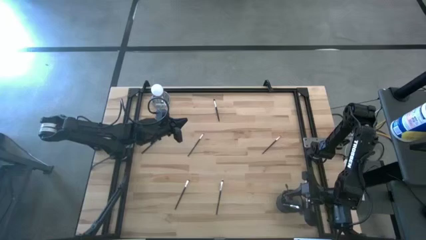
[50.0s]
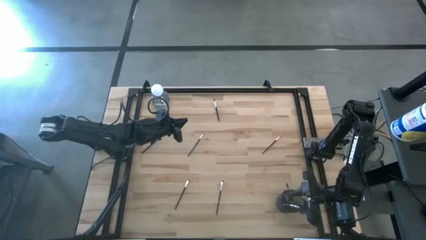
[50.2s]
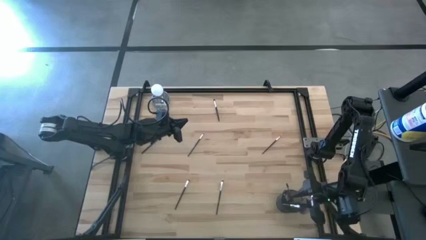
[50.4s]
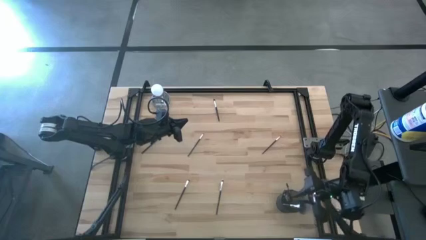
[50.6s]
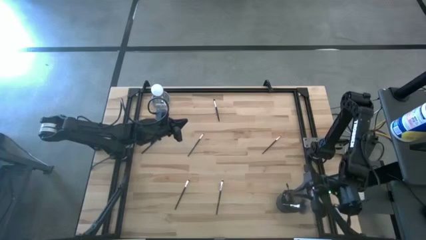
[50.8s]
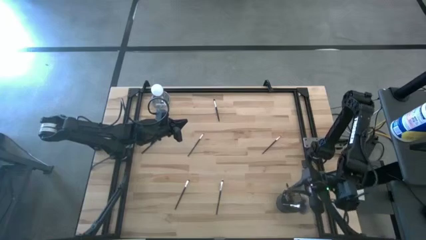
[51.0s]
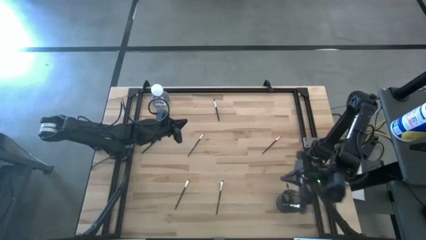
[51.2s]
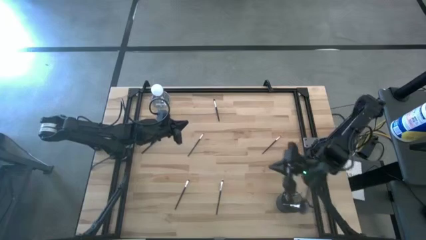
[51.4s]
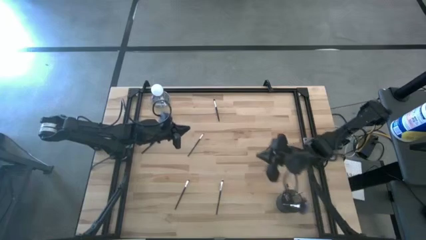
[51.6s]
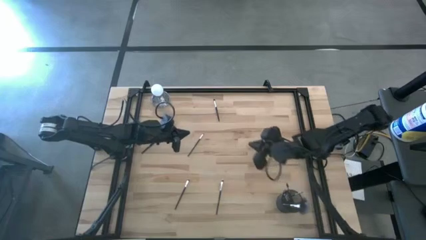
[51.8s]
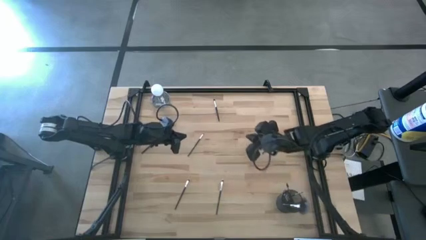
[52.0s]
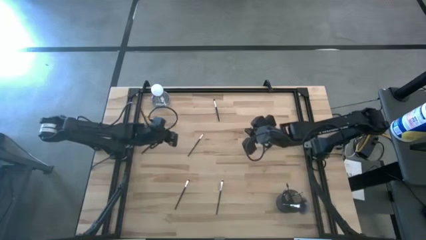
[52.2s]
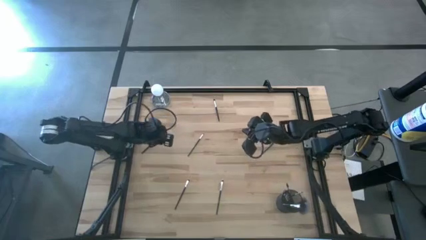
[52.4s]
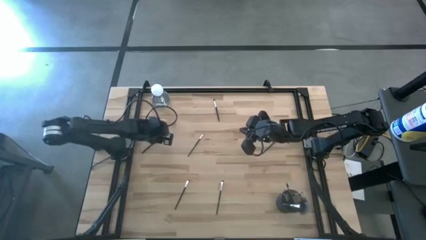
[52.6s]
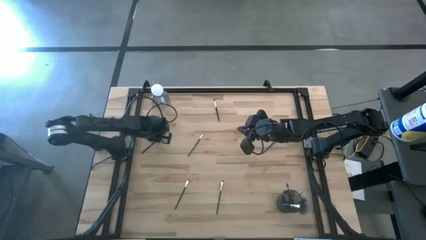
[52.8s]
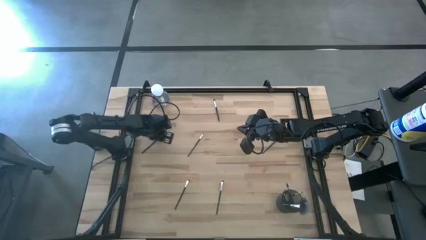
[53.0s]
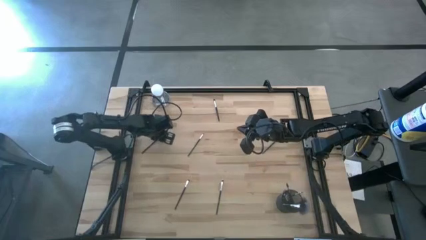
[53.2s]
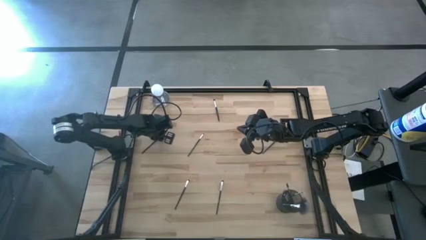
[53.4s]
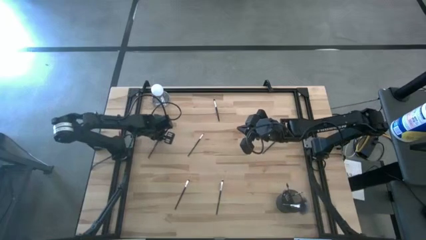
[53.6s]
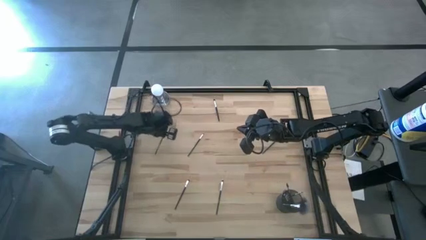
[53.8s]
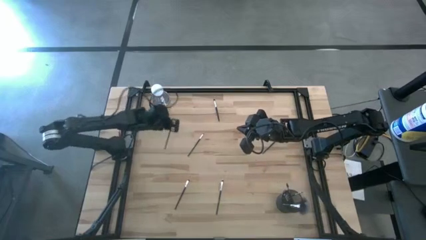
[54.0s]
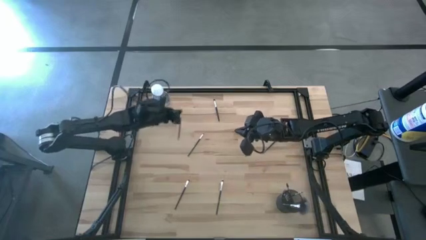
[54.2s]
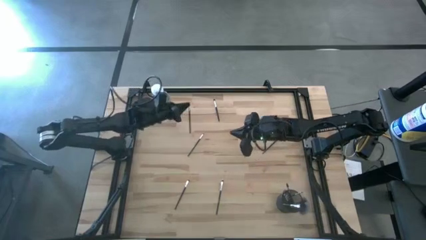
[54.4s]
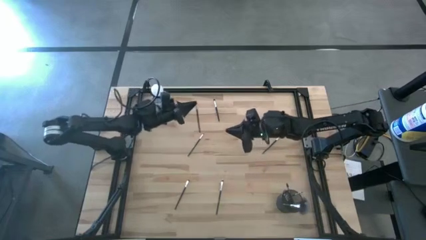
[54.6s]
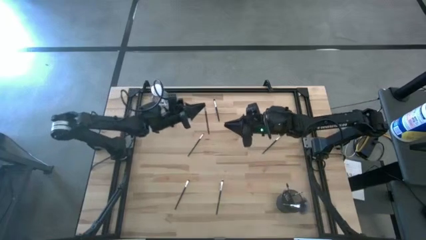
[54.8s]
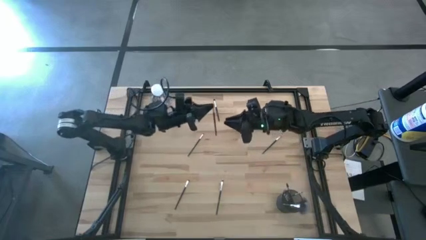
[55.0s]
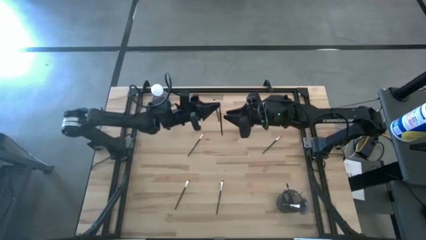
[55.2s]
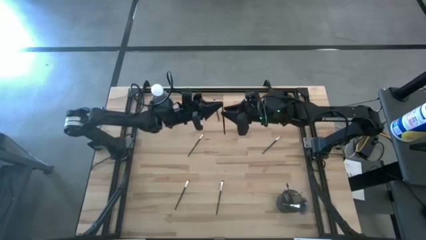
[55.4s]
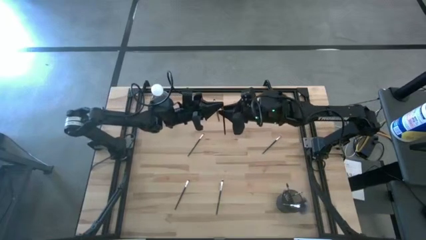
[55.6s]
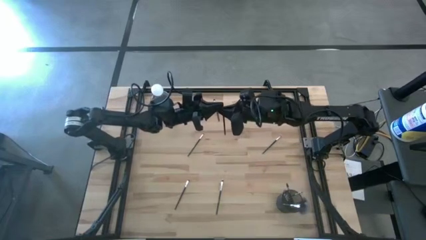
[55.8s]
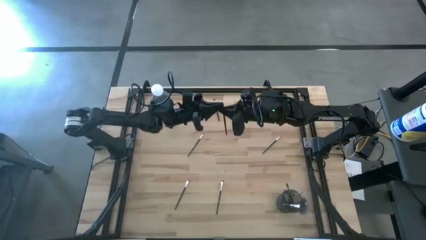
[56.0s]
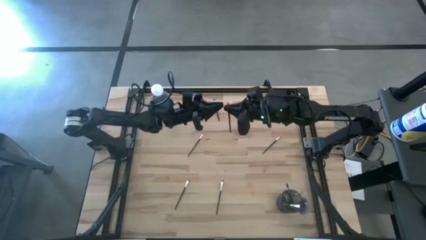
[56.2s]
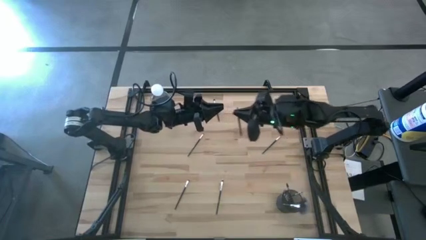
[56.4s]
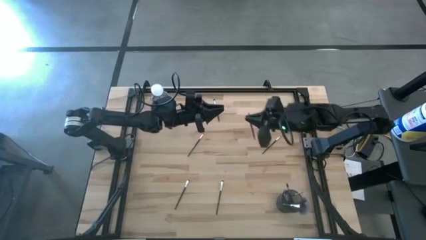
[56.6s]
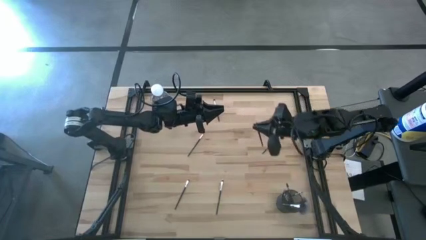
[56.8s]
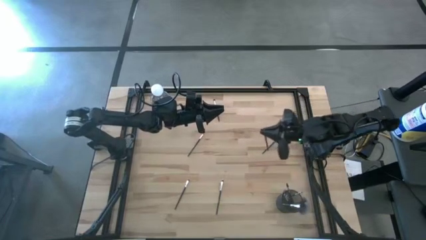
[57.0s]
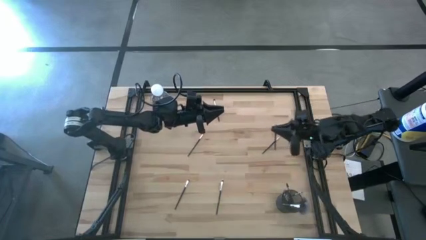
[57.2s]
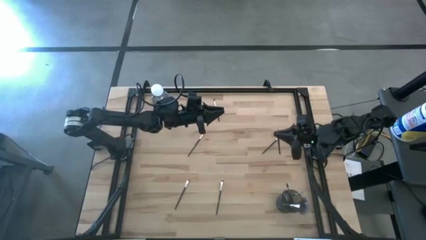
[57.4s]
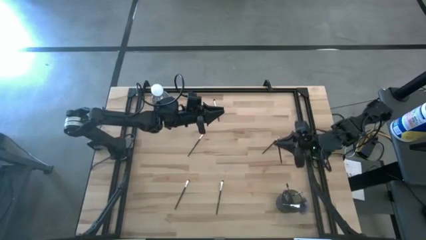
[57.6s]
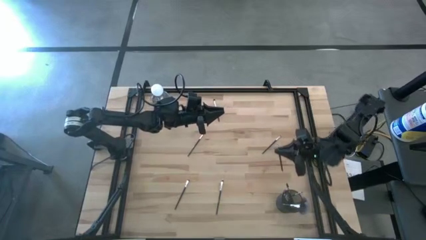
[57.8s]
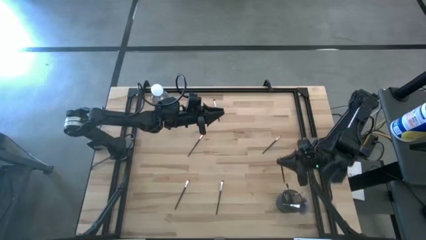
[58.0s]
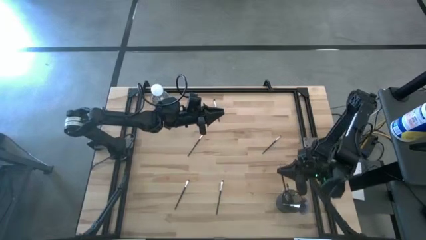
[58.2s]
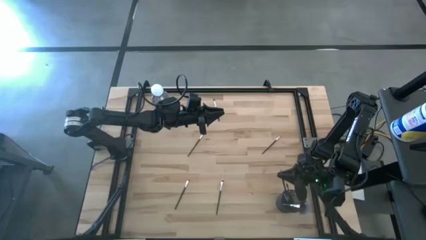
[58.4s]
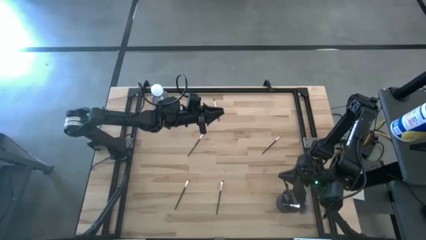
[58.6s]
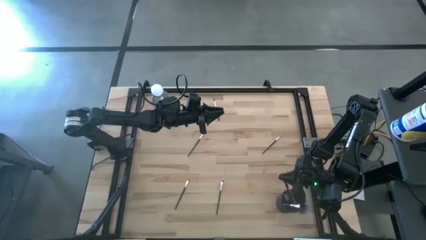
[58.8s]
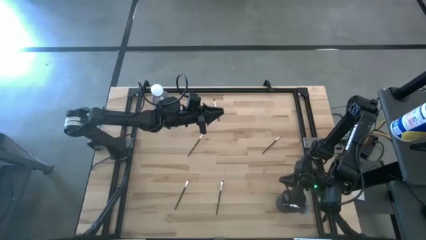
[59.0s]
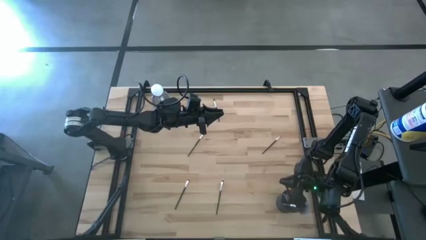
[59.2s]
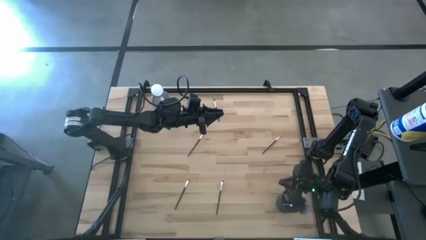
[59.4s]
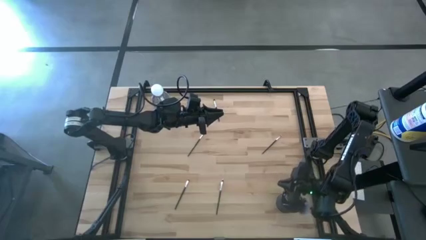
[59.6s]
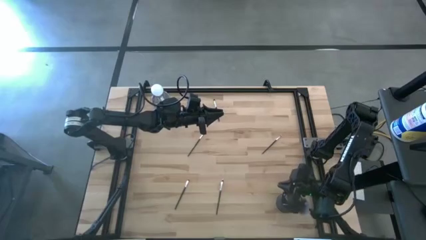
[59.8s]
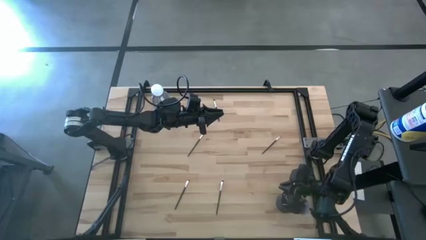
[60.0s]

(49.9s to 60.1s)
Task: Put items in baskets/containers
Put the liner brush into the brush holder

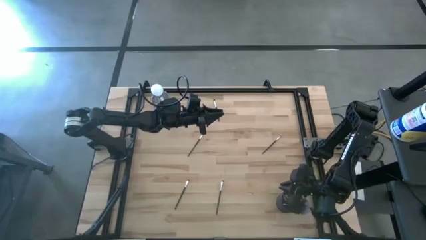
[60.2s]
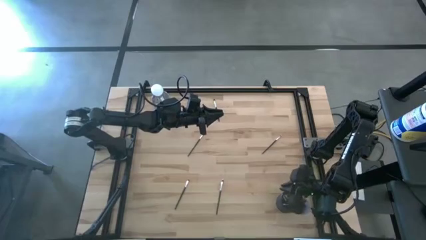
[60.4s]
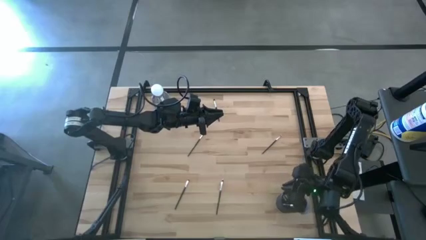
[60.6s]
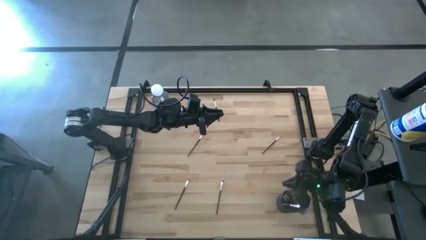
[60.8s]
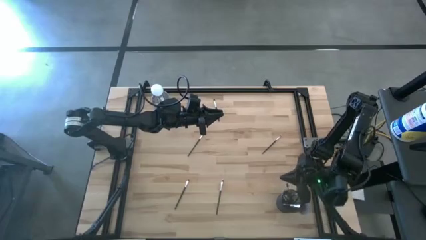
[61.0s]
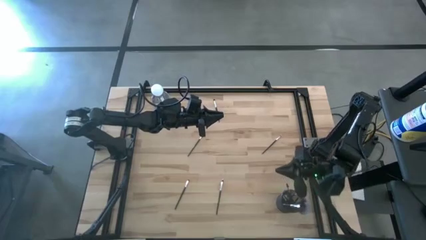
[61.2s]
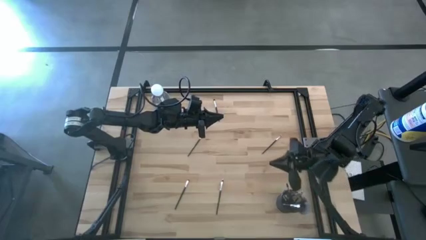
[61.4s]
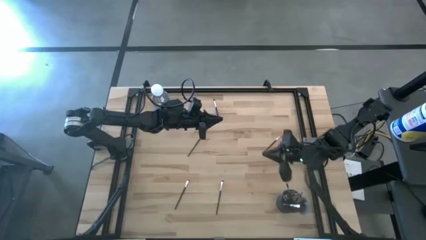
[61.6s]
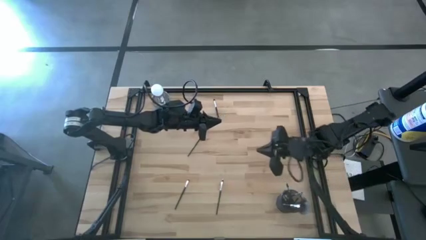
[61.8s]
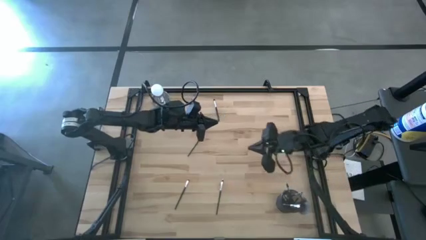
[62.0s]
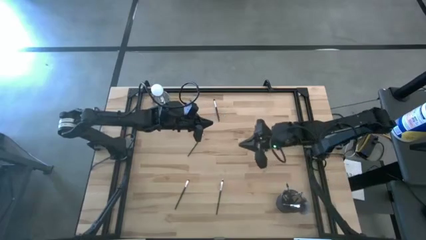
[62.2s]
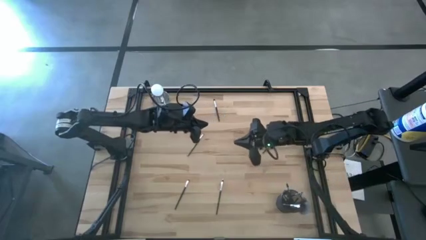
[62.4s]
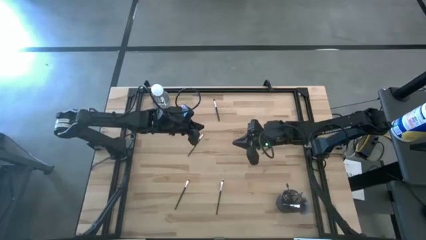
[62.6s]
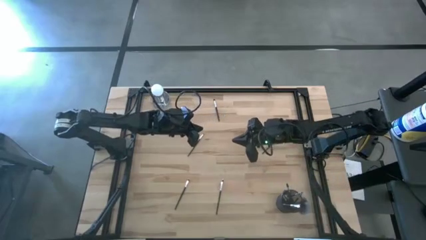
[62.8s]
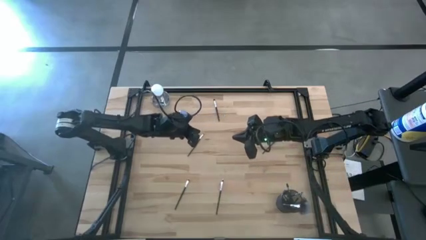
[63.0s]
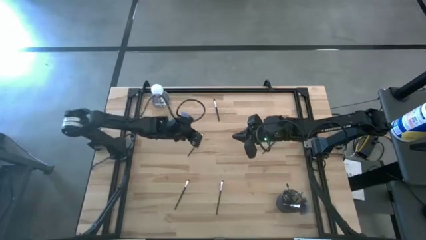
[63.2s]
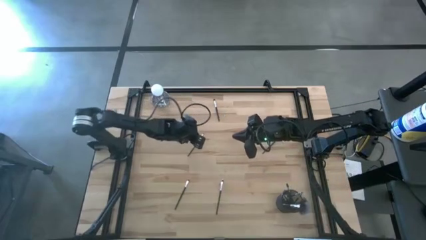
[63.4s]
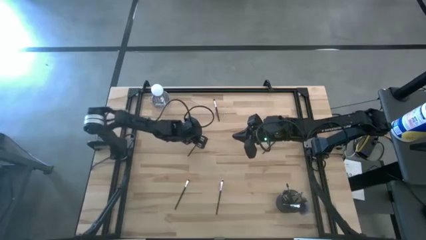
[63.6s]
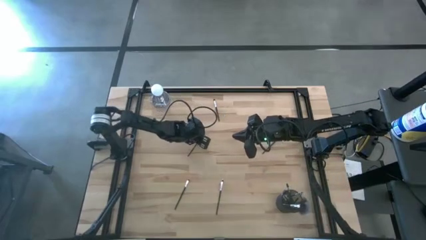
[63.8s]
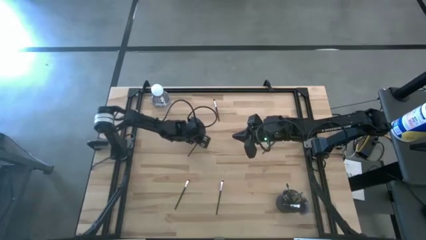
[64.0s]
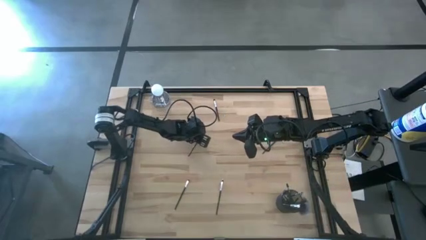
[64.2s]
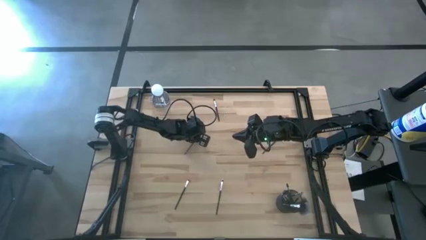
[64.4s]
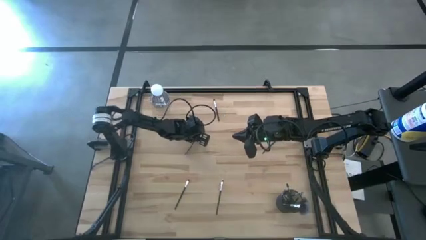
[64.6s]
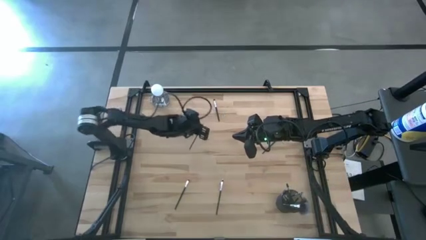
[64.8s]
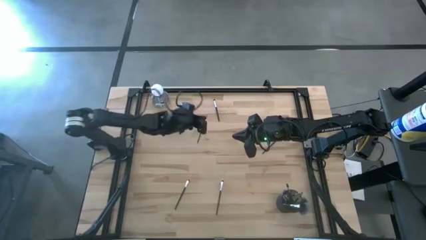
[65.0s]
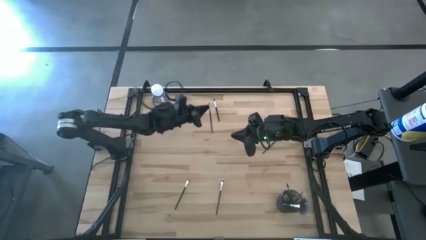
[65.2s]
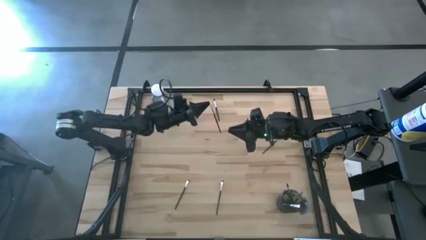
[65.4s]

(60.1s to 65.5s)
Put the liner brush into the brush holder
